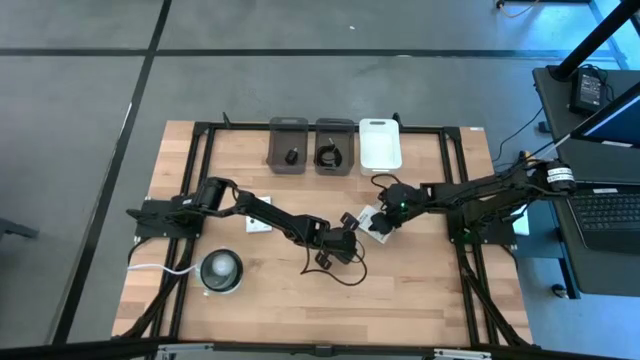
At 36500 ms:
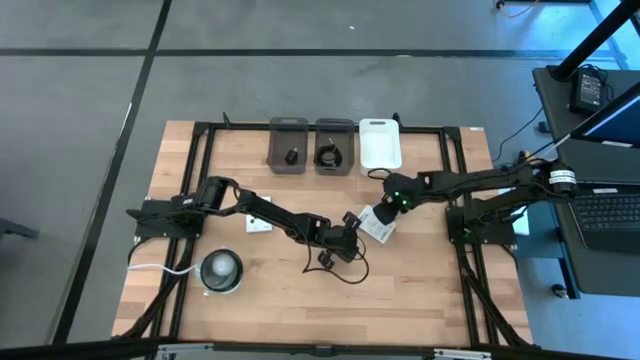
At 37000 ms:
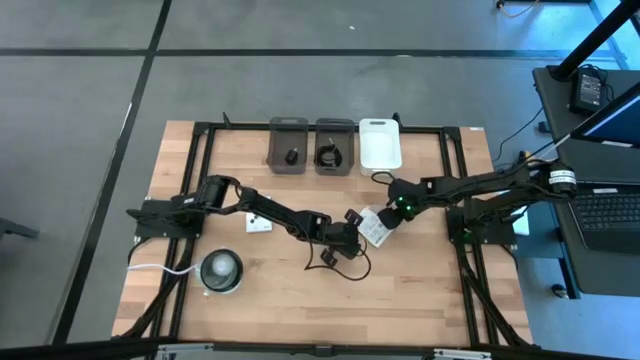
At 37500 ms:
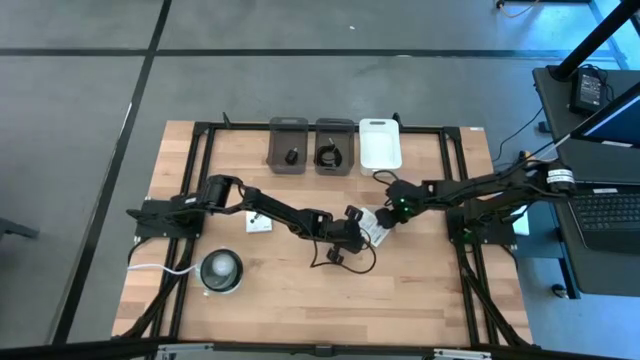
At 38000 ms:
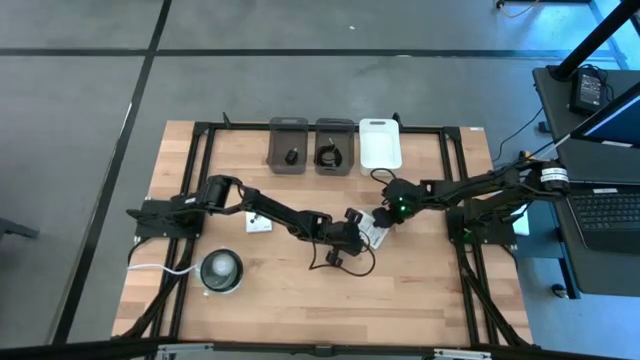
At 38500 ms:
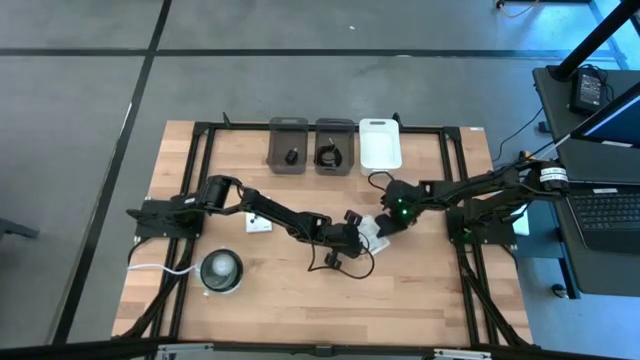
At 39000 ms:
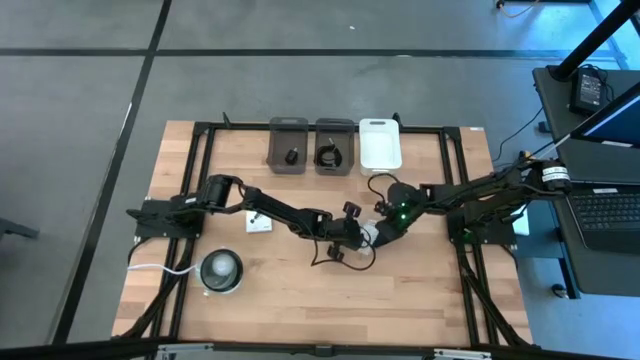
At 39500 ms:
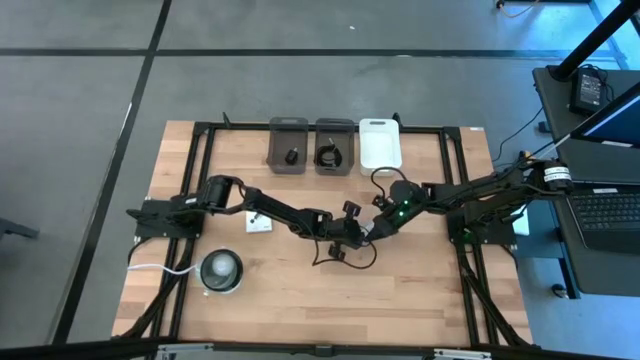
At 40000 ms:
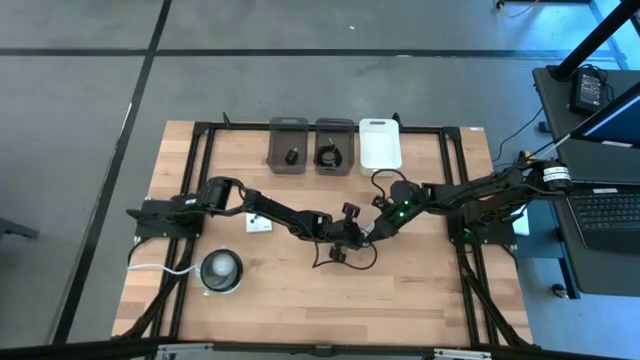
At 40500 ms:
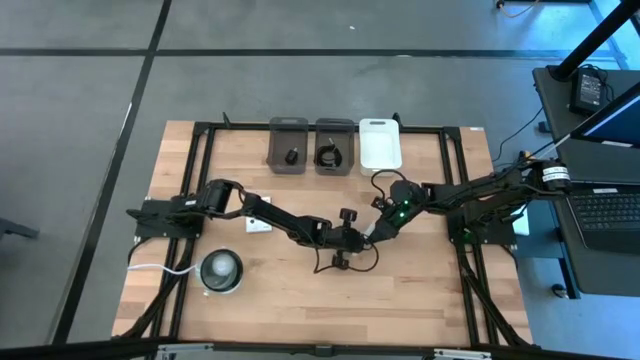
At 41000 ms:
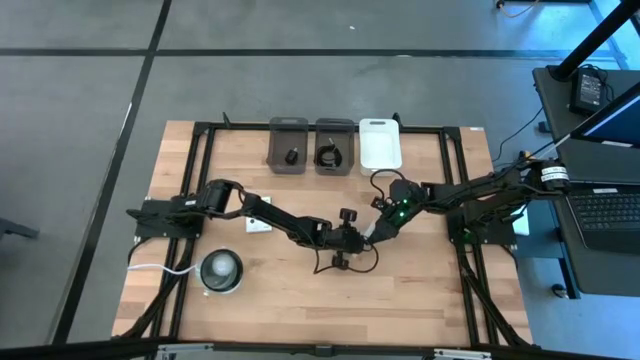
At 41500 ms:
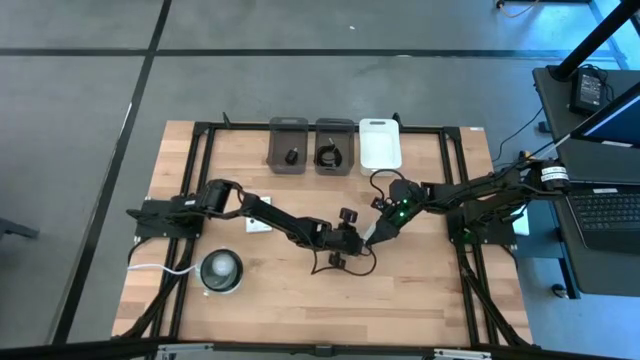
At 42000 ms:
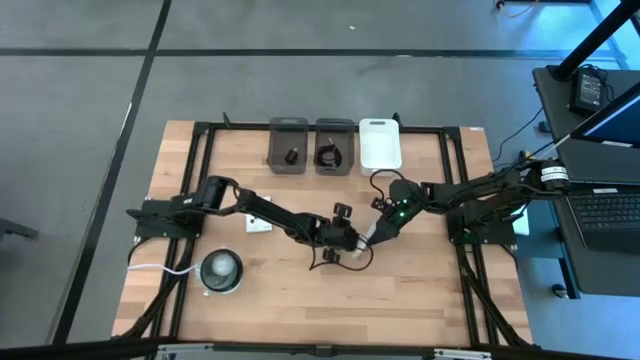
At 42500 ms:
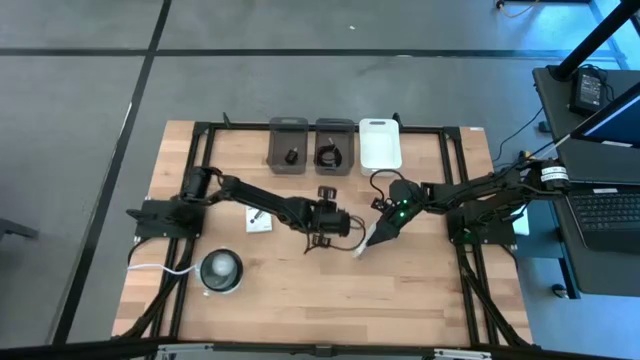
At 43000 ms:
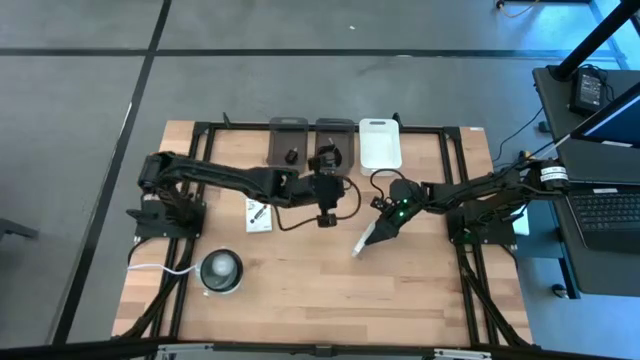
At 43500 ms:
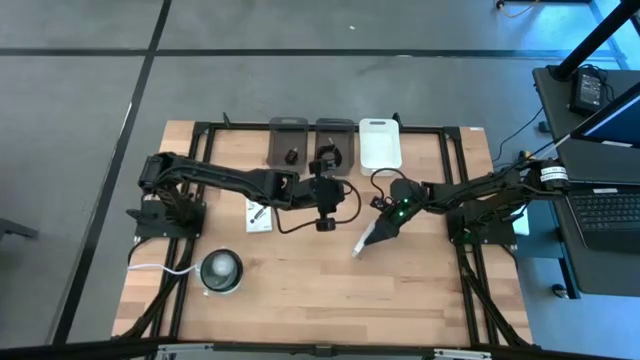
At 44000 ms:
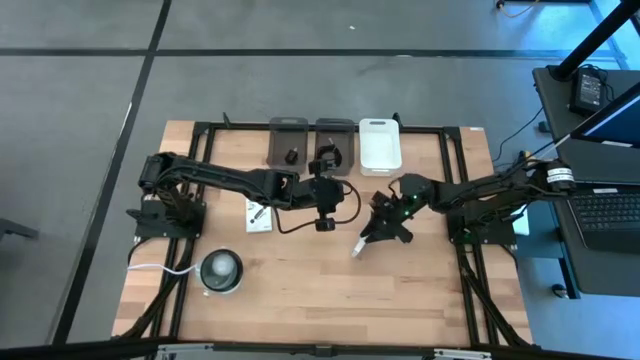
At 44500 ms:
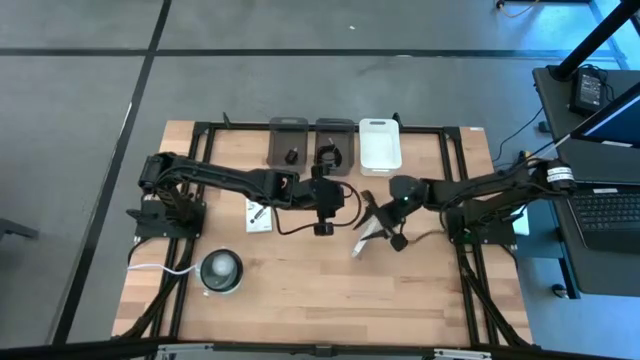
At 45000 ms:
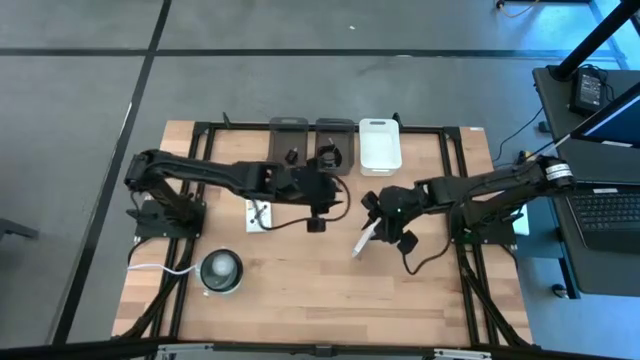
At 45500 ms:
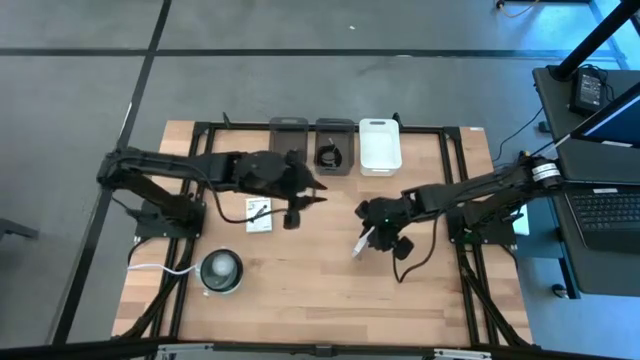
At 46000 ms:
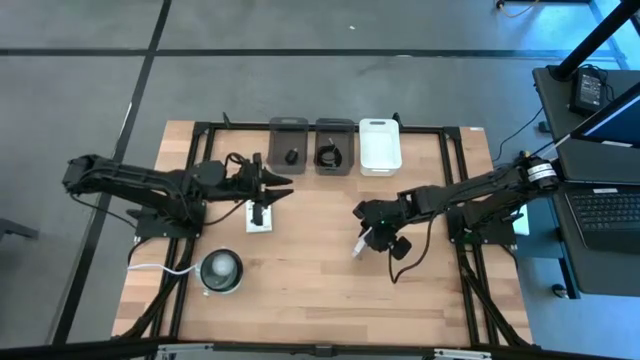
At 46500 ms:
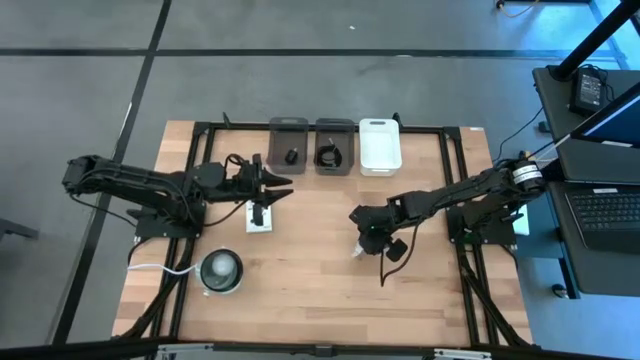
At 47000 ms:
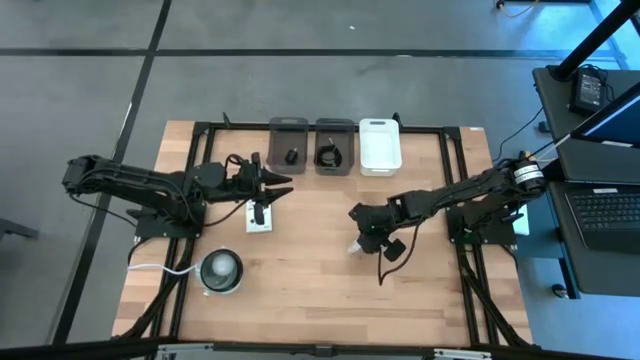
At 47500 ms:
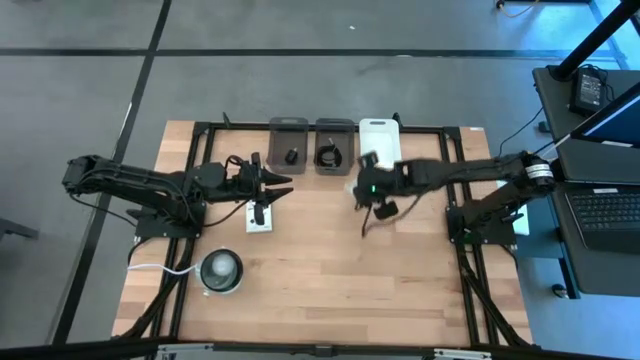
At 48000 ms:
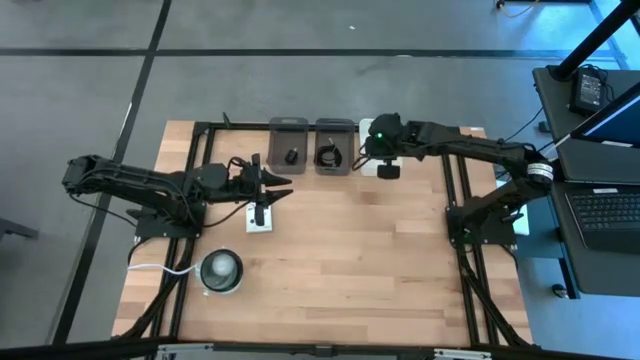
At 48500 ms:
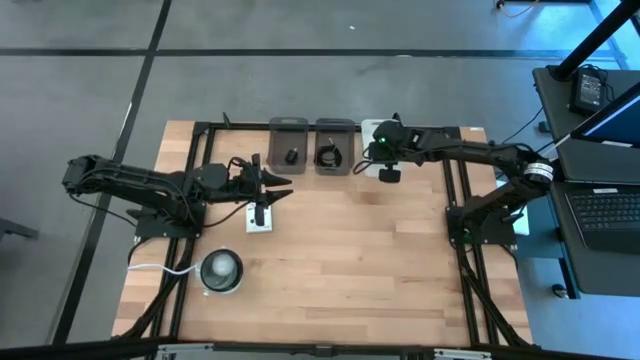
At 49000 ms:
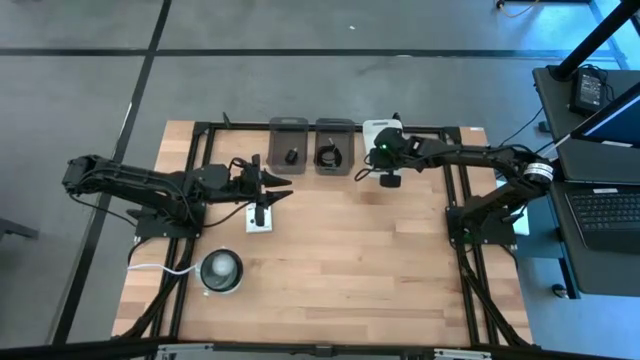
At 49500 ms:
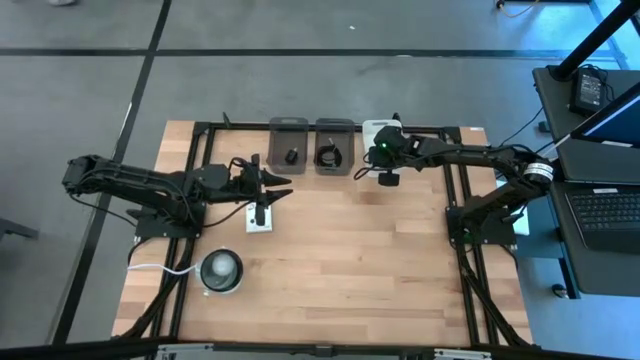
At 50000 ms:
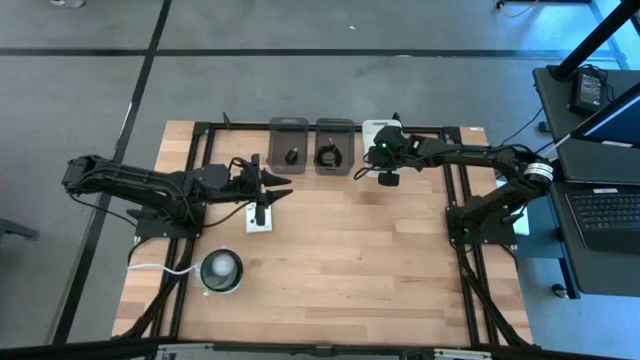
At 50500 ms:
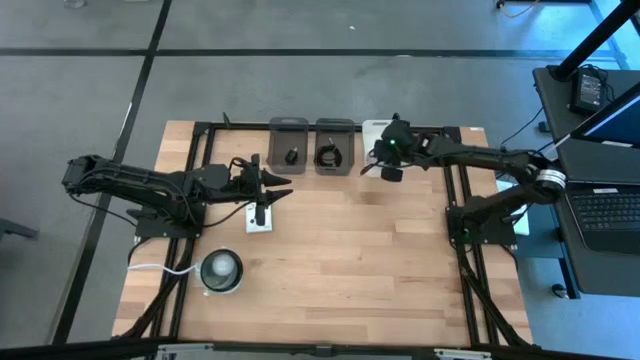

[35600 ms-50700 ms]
Task: Pick and place items into bin
Put the white card reader box into the white bin

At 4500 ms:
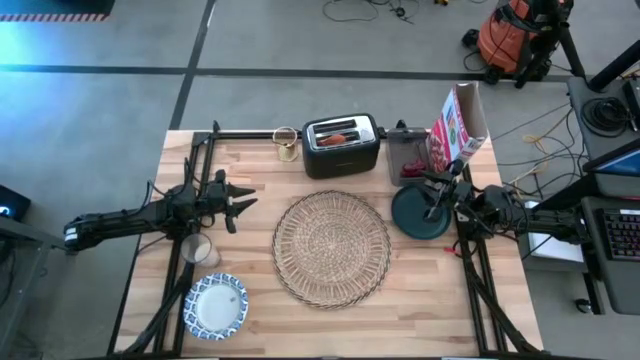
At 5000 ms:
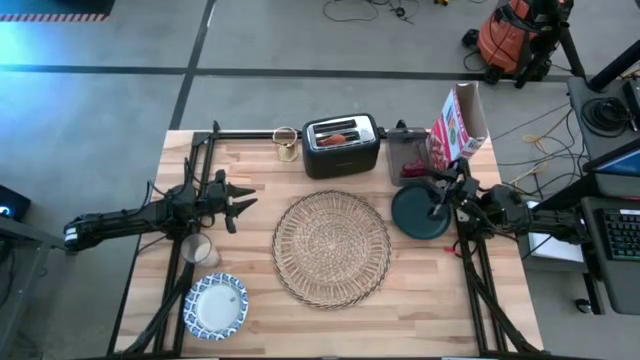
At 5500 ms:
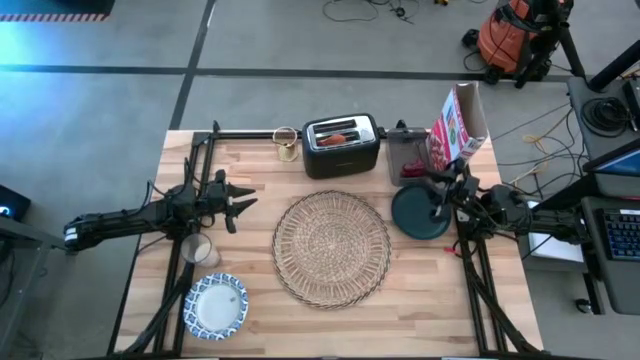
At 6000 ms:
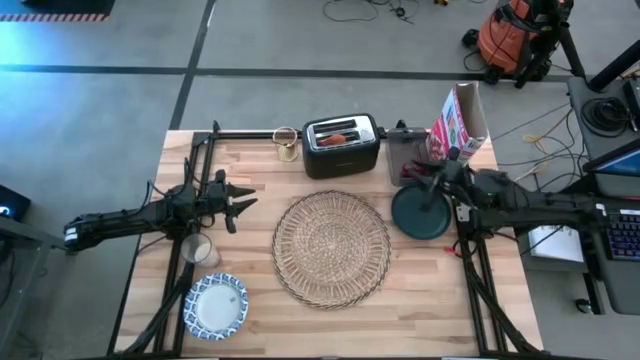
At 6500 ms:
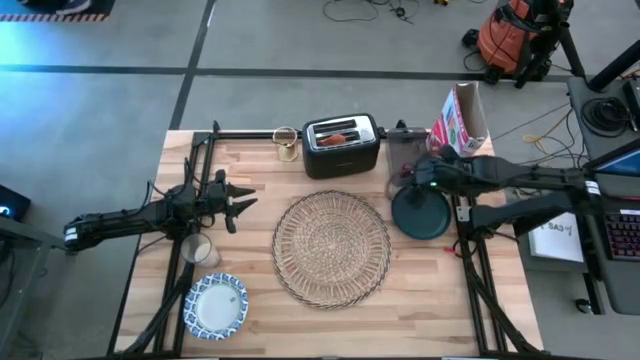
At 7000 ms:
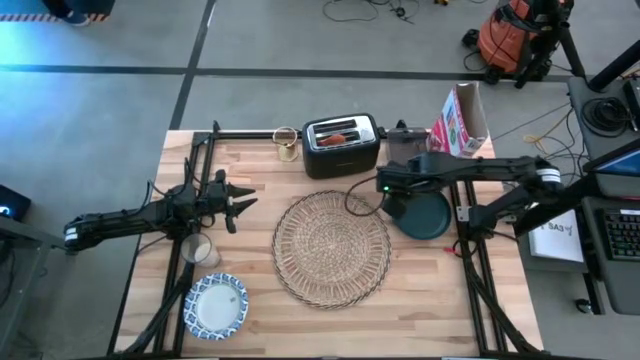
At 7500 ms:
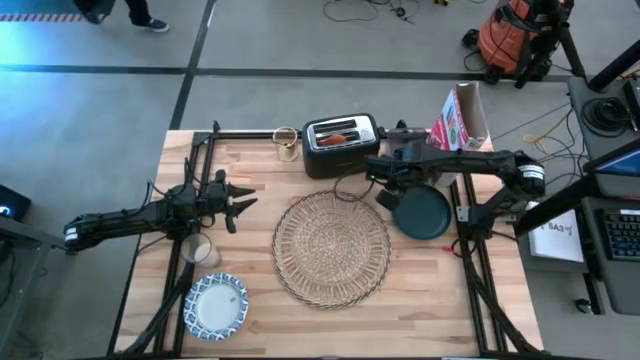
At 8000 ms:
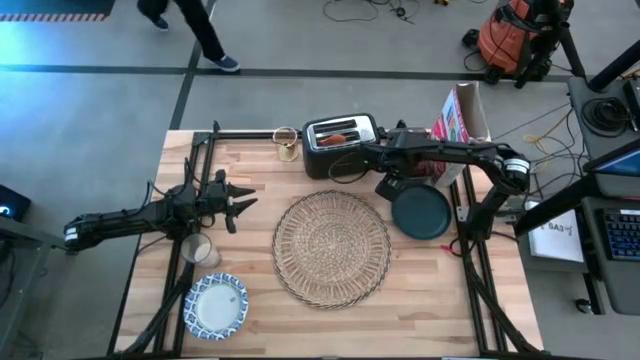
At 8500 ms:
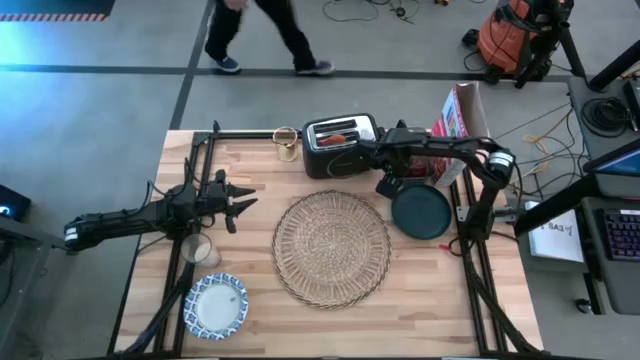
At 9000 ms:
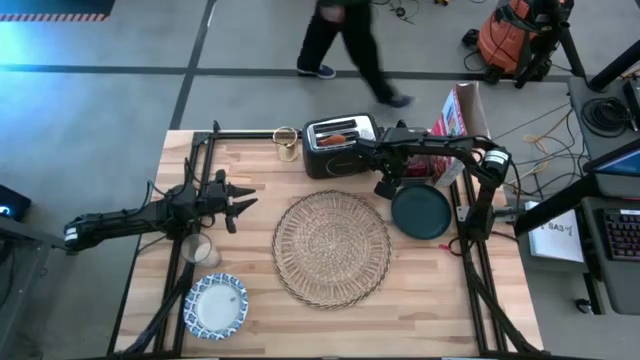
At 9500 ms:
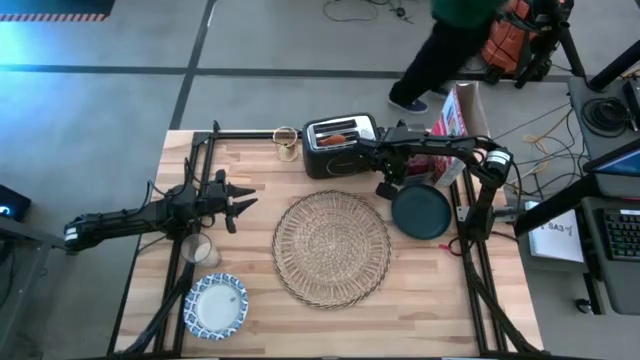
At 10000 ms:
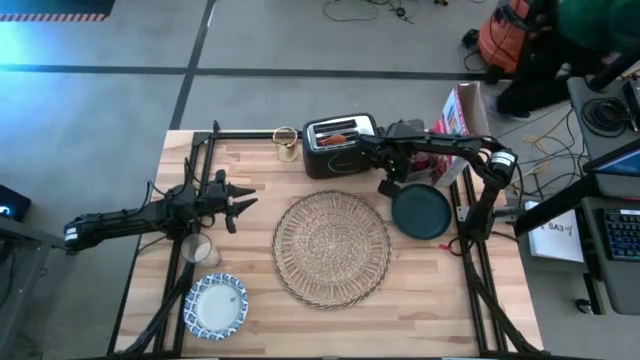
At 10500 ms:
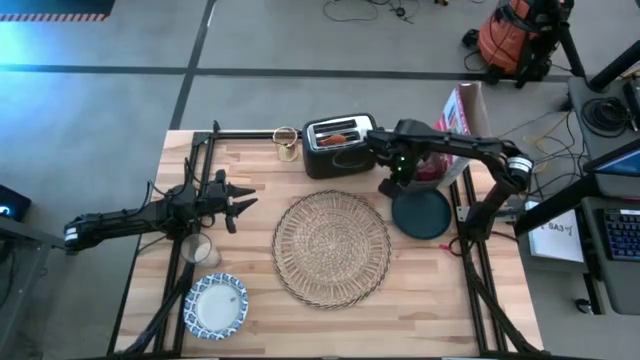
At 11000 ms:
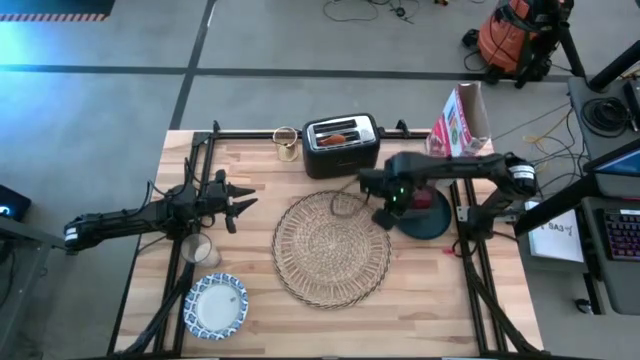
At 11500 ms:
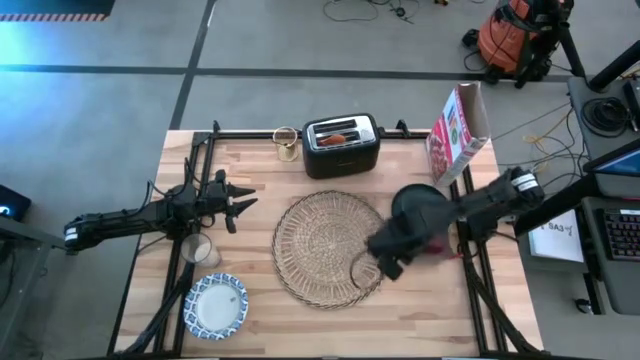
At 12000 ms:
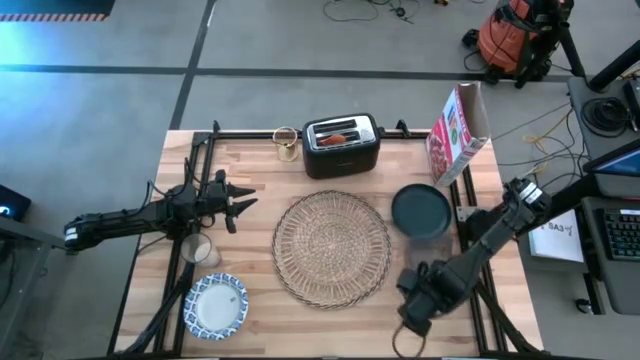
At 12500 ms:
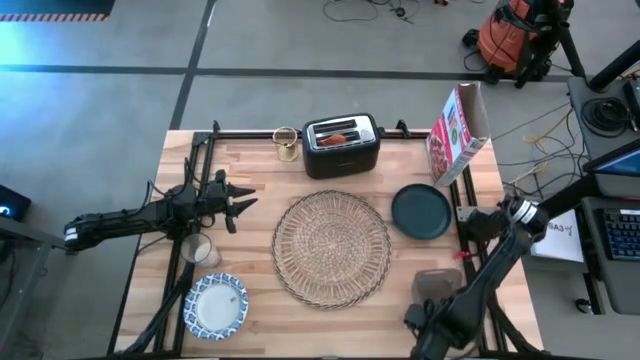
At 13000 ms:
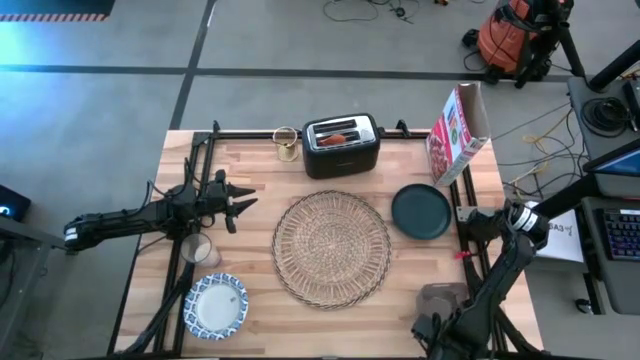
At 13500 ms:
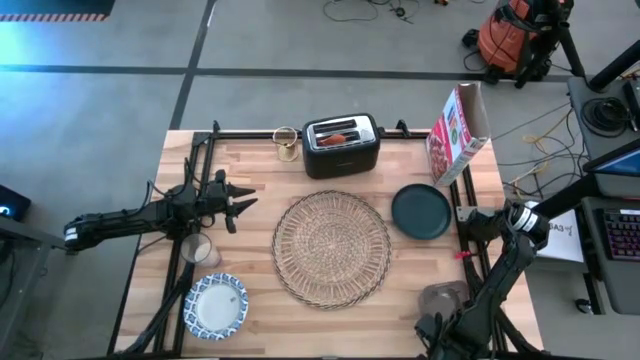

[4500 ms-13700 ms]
Task: Arrange a breakfast setting
Move the black bin to the bottom right of the table
